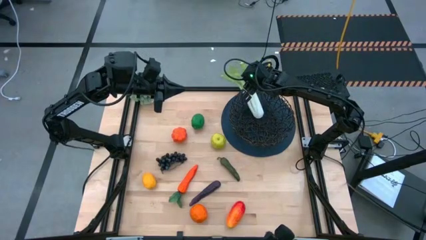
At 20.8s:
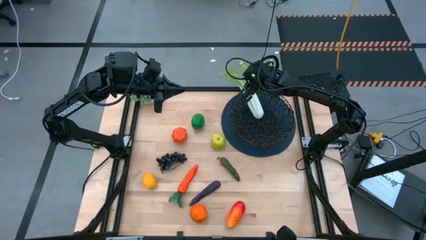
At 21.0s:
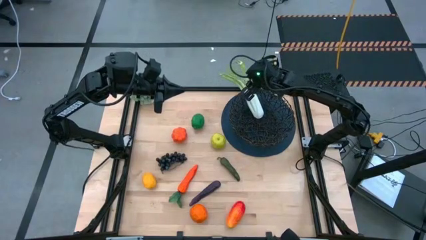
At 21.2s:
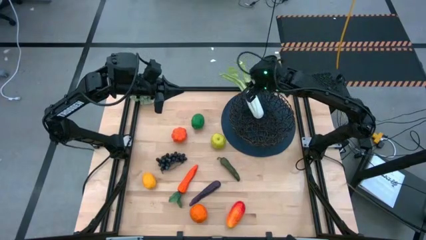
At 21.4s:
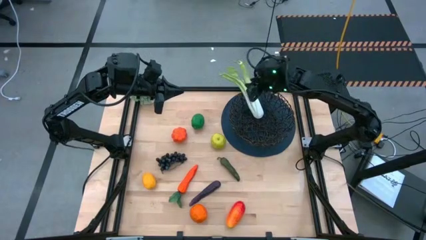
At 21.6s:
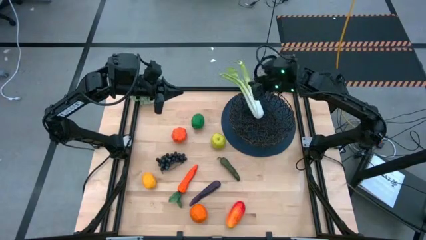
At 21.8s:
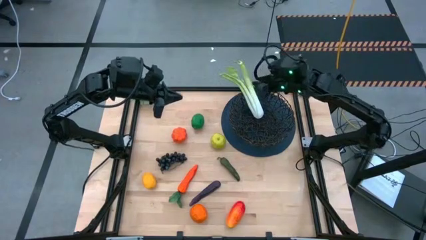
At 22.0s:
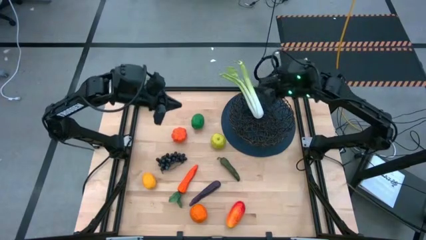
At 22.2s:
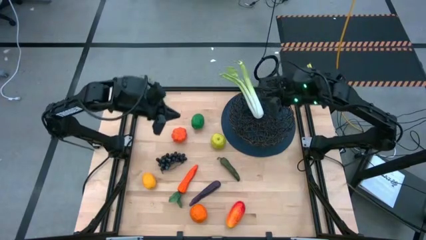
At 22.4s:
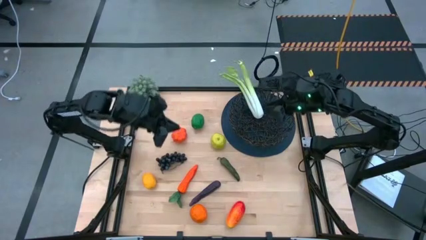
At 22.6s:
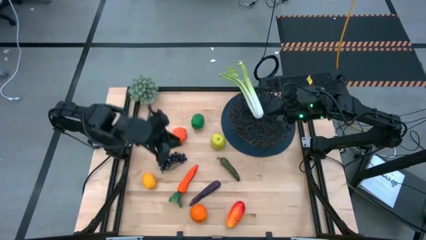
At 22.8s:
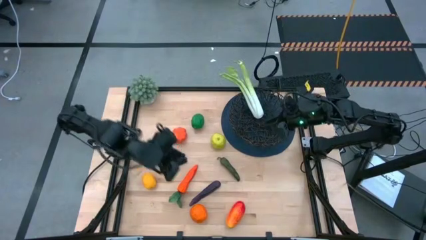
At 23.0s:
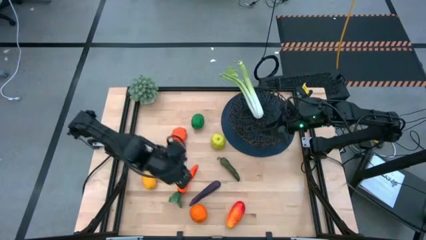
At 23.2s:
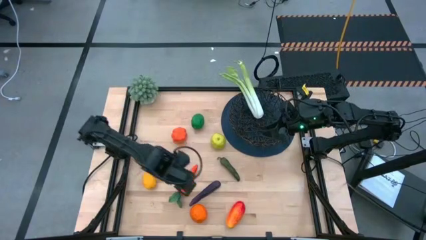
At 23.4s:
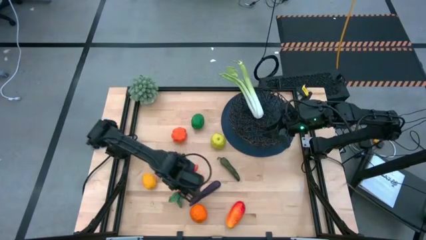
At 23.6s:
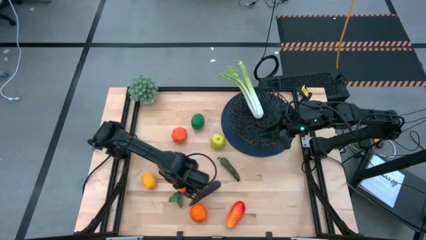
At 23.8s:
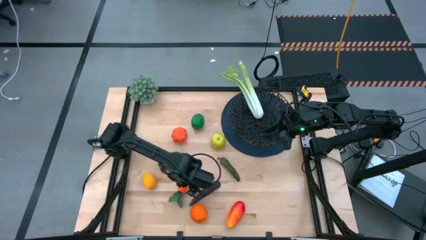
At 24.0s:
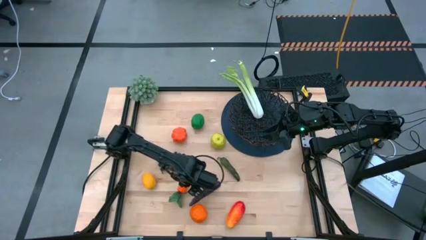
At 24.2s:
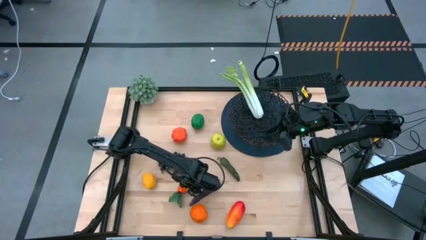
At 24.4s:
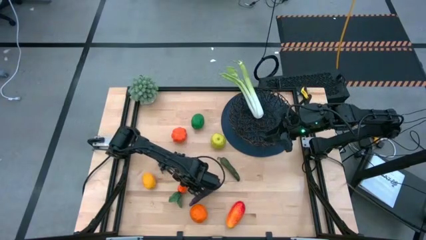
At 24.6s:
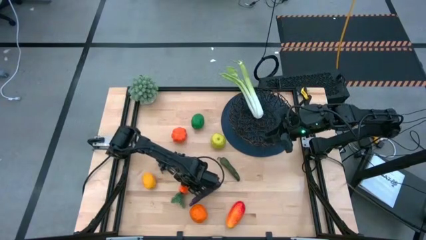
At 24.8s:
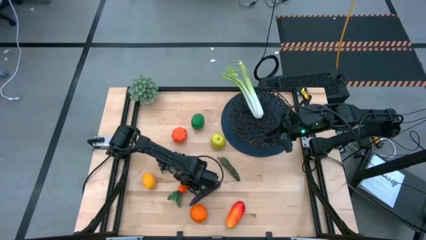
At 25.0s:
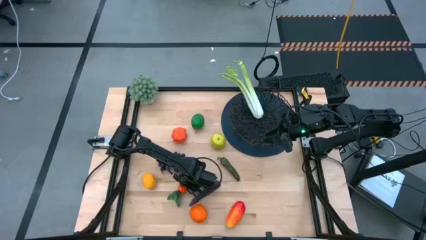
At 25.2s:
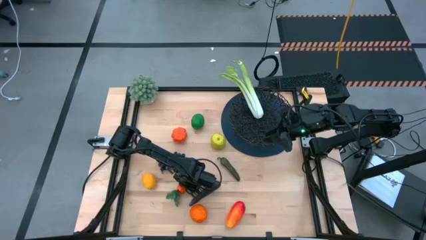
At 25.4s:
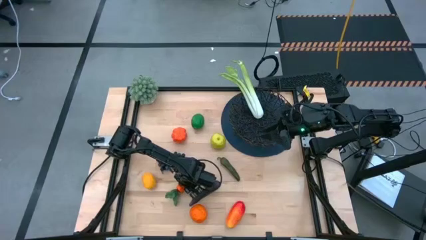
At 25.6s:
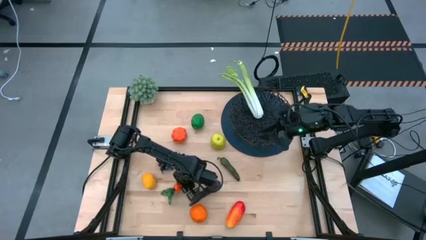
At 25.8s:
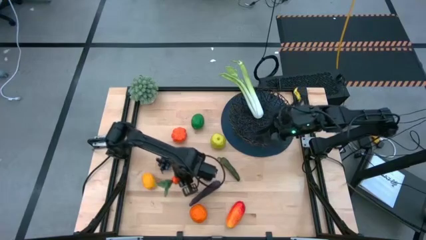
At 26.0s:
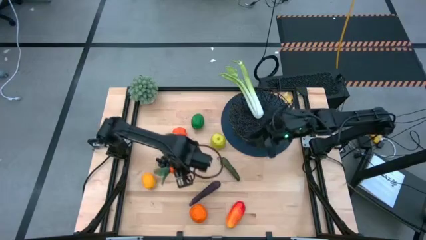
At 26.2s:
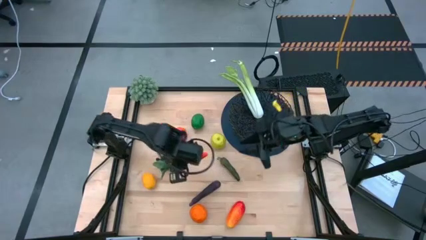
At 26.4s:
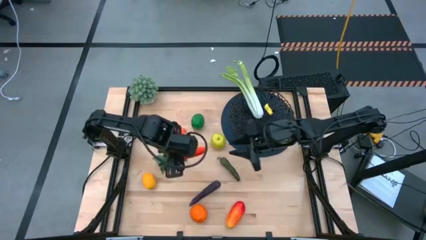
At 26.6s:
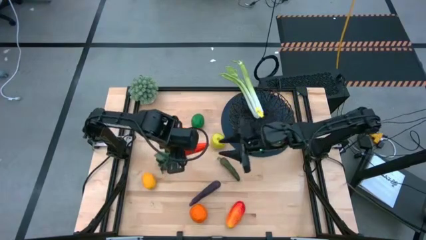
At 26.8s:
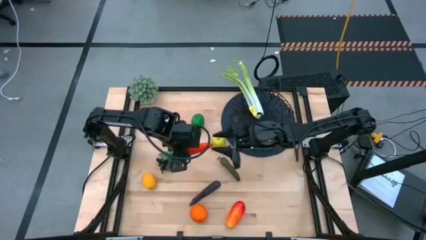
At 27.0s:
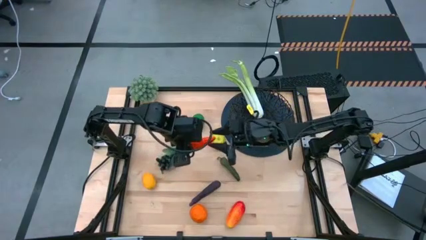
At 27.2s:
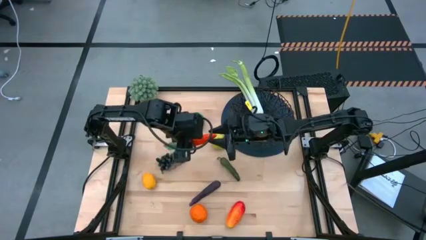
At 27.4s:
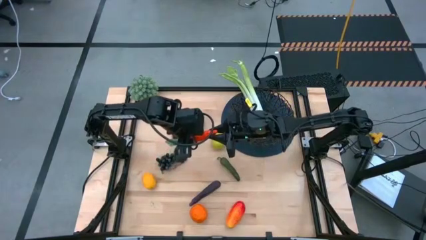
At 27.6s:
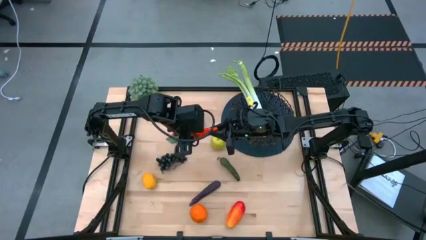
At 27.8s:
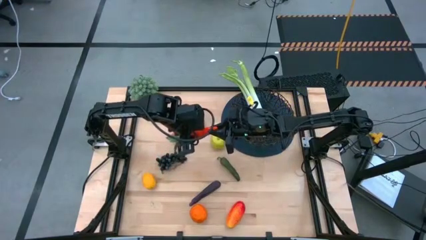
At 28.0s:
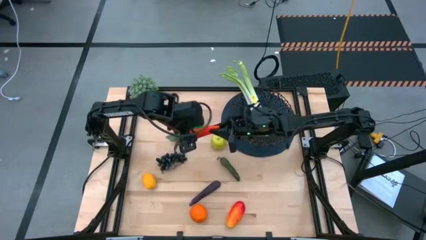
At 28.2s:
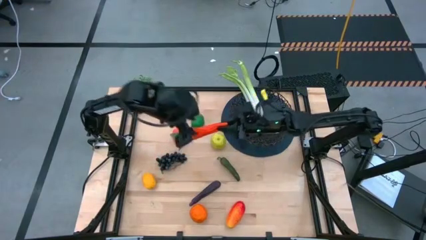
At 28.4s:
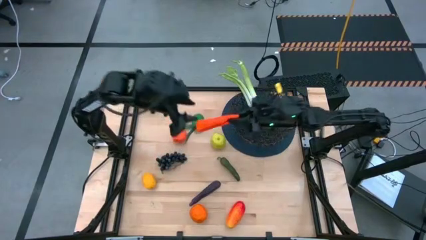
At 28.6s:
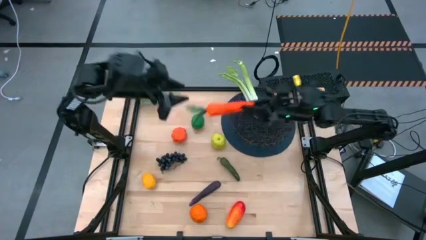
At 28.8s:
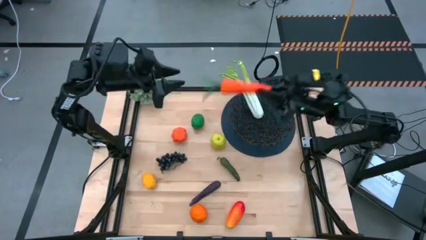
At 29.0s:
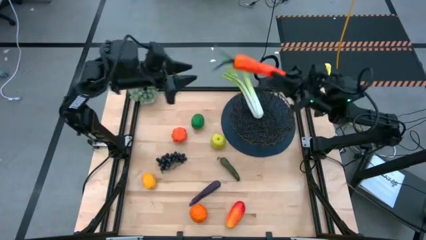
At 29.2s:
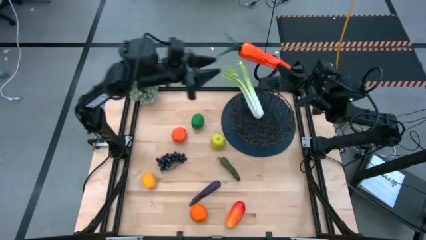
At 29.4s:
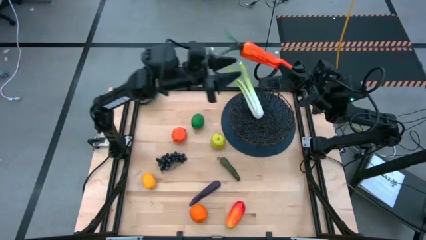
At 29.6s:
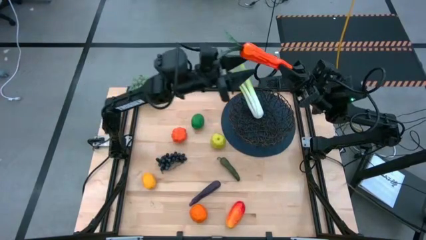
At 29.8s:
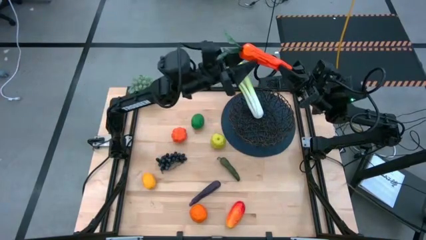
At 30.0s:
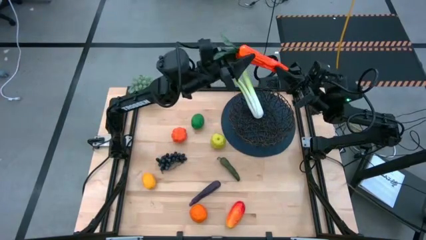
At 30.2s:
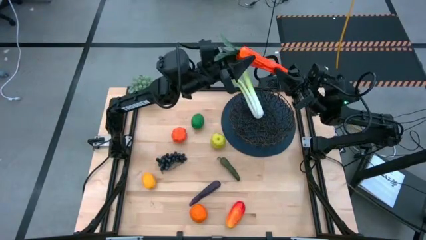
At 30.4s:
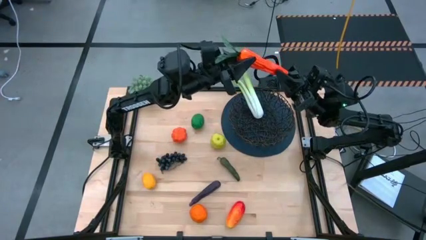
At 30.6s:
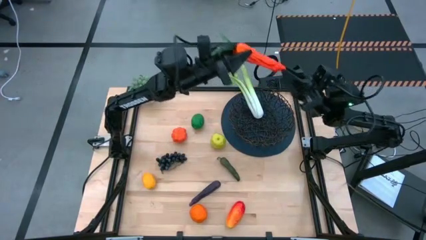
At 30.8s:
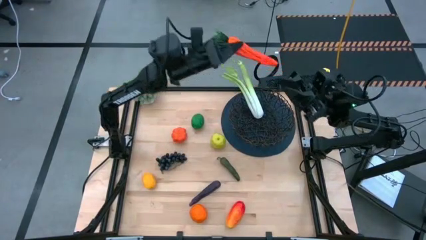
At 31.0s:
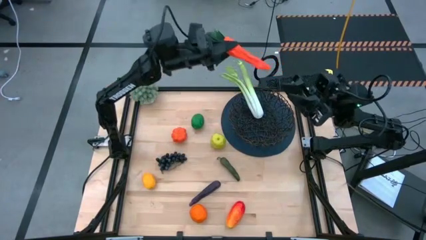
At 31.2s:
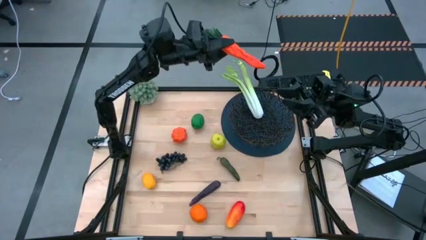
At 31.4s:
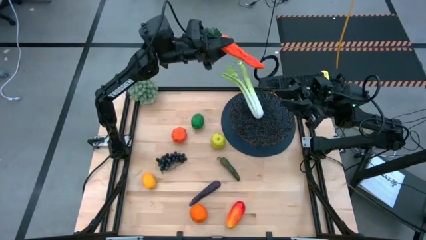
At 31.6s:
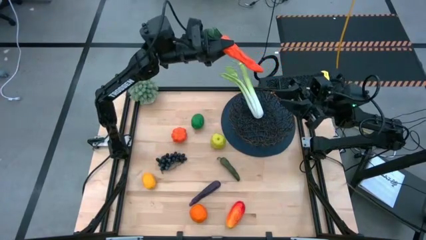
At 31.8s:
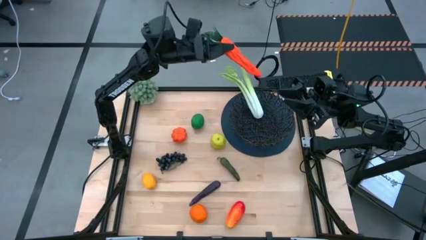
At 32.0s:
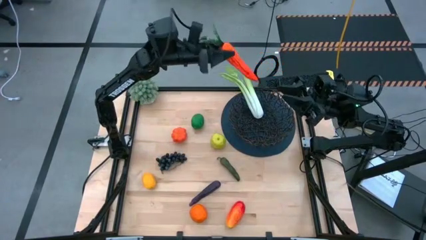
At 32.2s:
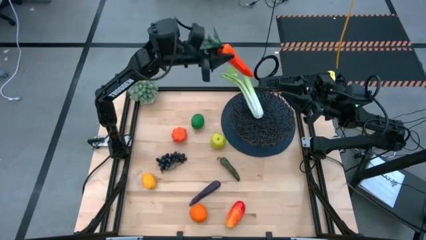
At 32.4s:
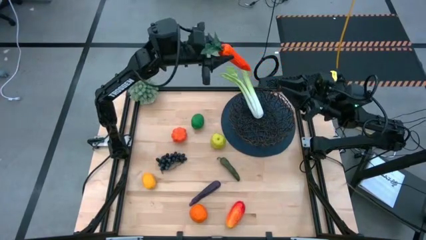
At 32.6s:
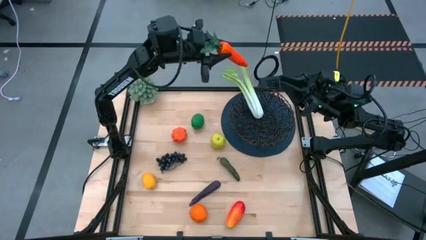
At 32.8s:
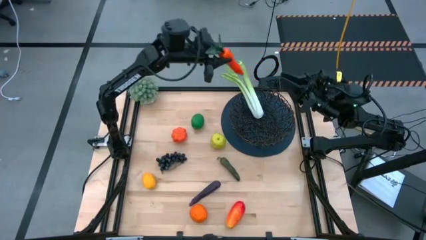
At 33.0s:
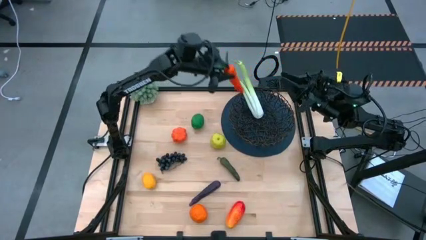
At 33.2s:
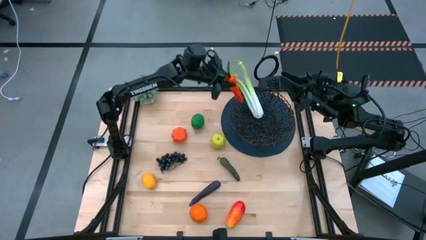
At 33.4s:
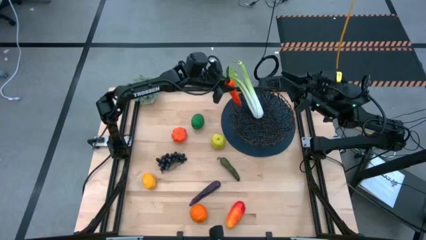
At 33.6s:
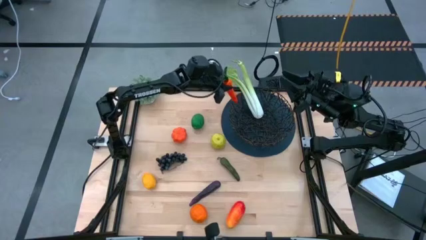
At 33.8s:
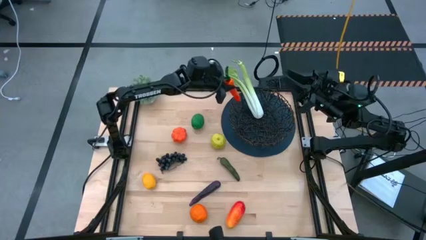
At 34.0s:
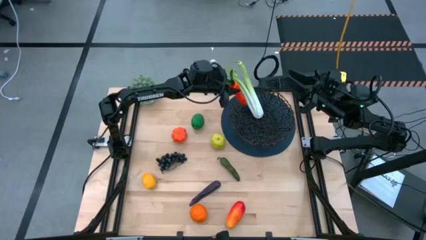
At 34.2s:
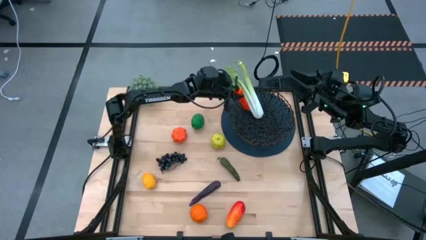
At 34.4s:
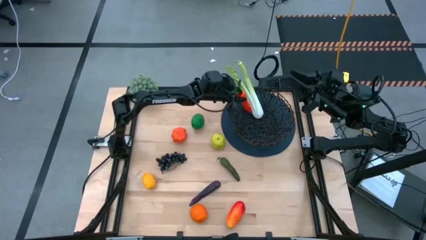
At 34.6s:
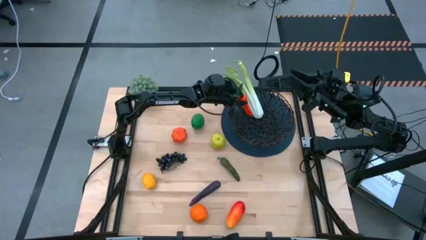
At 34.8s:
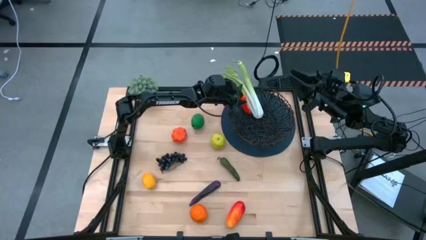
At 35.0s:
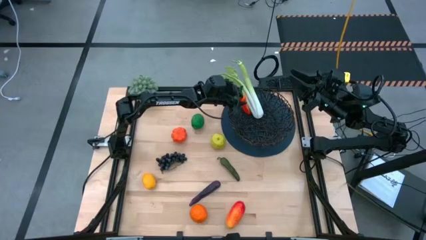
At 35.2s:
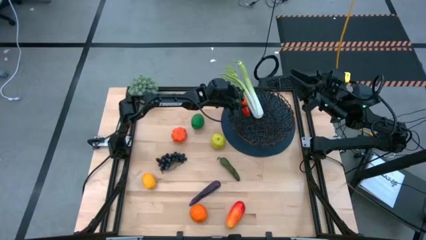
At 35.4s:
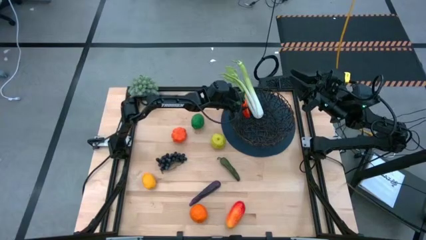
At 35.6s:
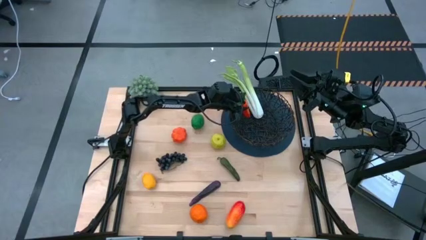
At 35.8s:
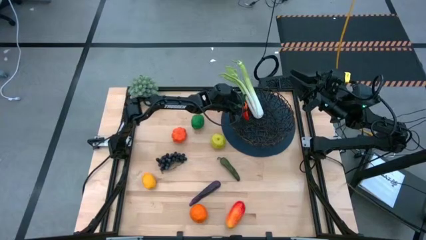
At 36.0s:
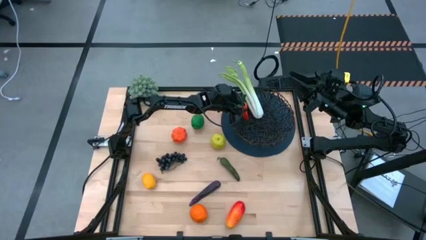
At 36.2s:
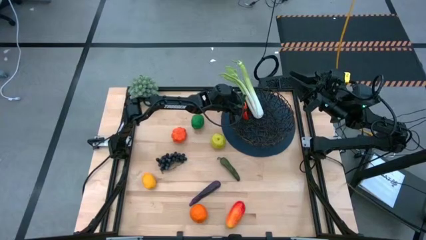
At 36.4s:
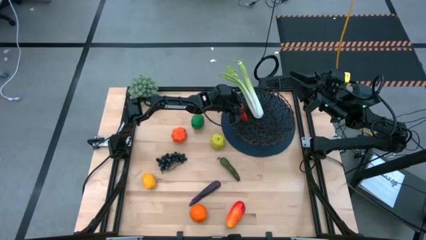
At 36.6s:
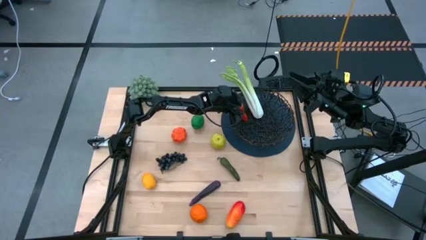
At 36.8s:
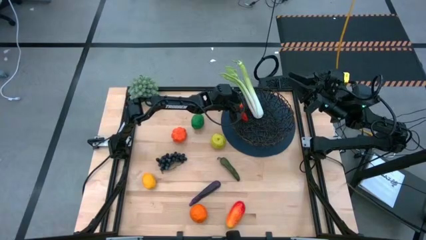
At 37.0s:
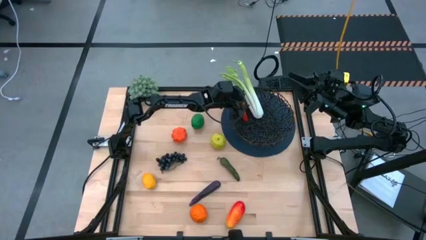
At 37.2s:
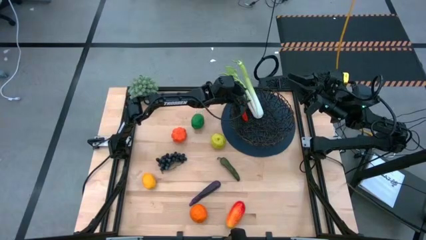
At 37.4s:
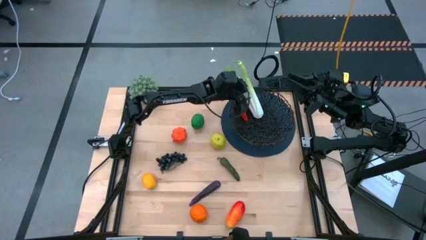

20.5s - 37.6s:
Task: Build produce basket
Put the orange carrot into the black woven basket
